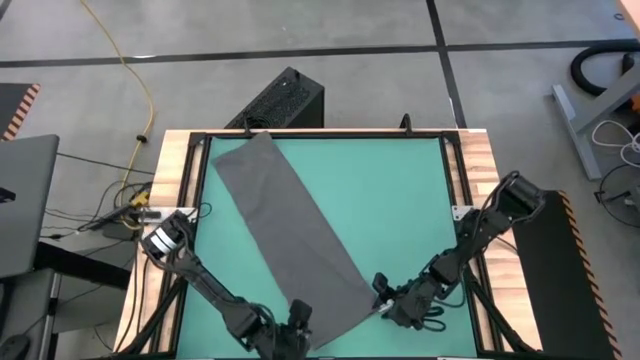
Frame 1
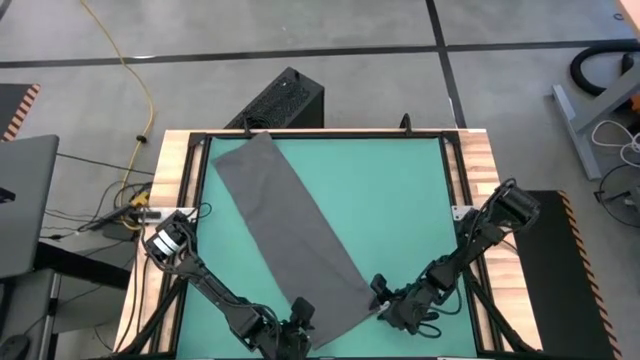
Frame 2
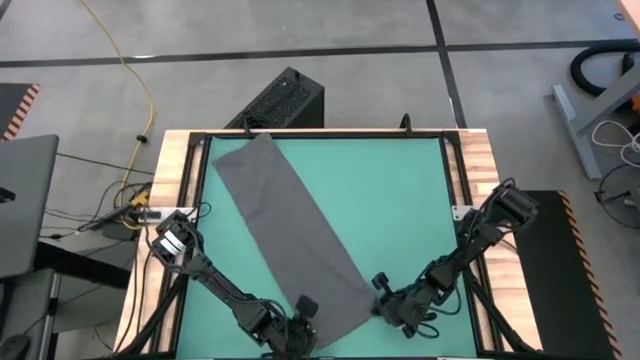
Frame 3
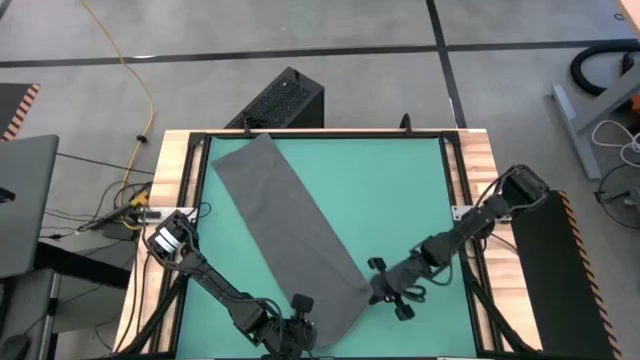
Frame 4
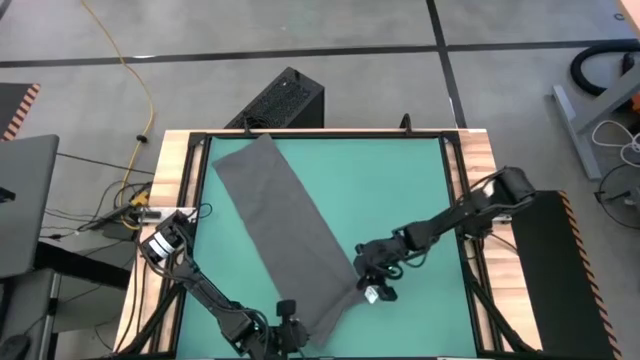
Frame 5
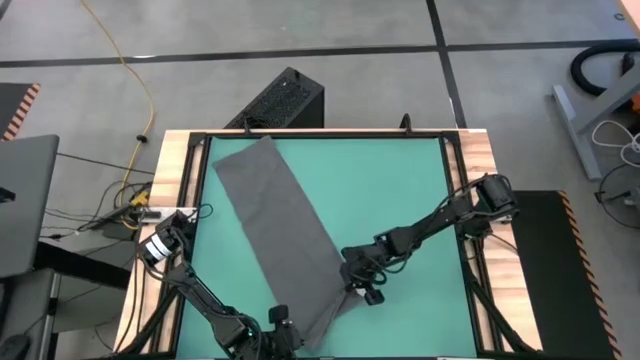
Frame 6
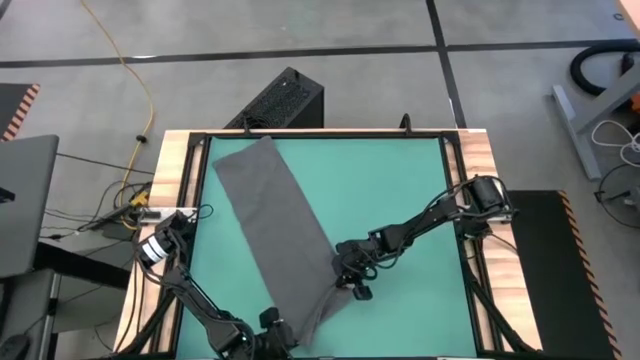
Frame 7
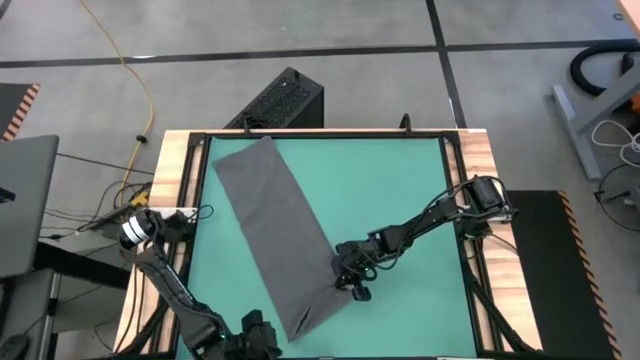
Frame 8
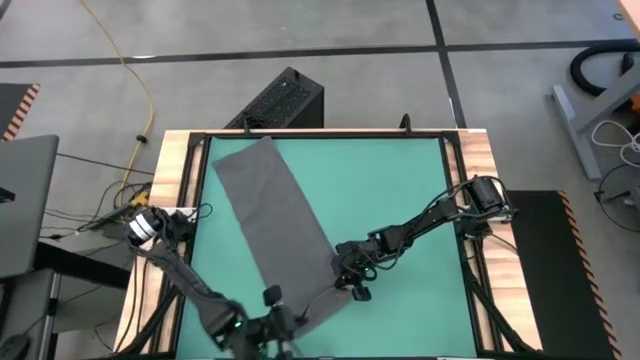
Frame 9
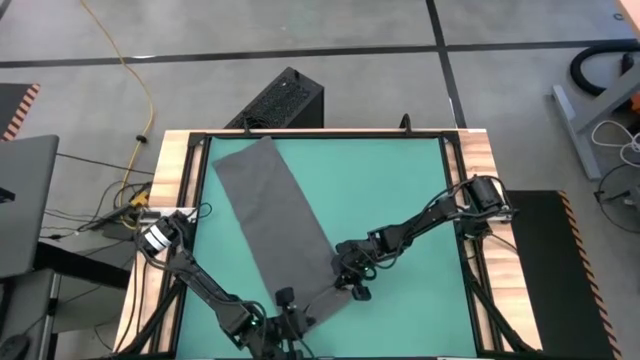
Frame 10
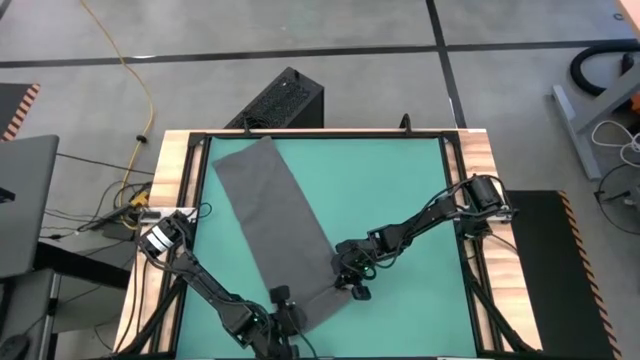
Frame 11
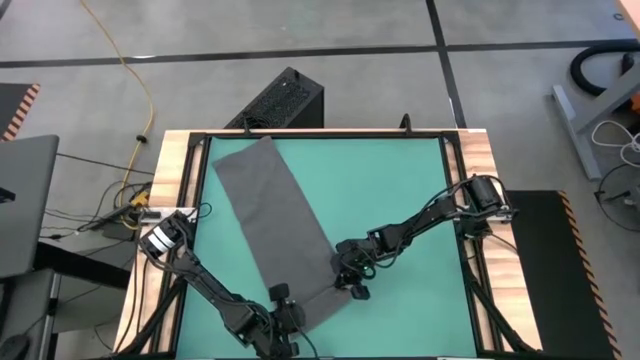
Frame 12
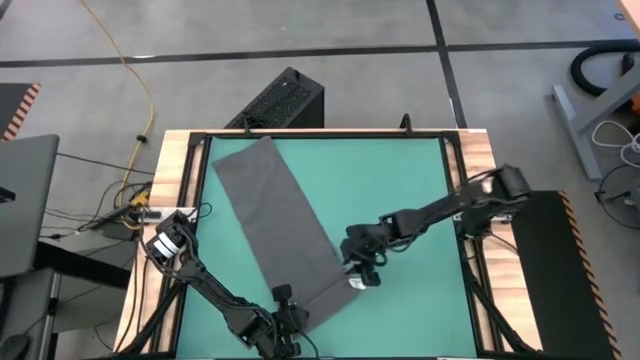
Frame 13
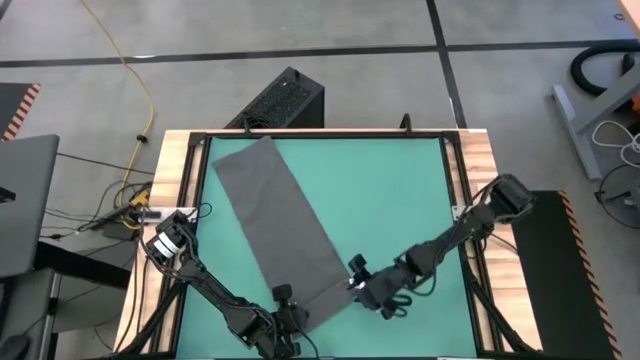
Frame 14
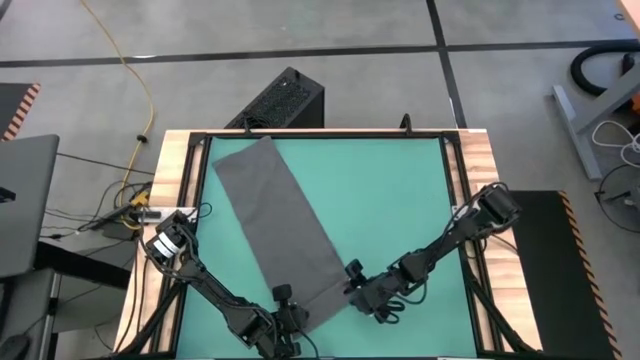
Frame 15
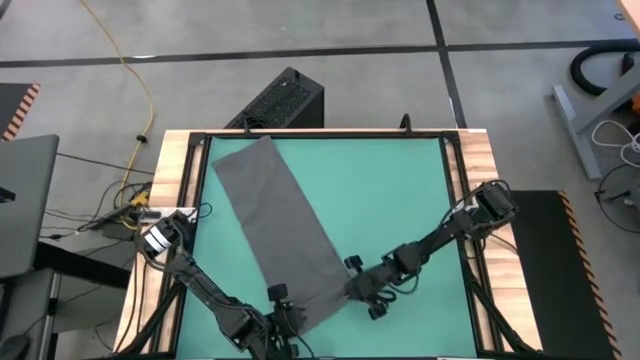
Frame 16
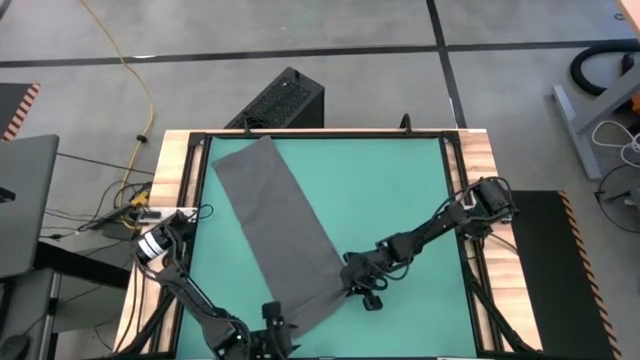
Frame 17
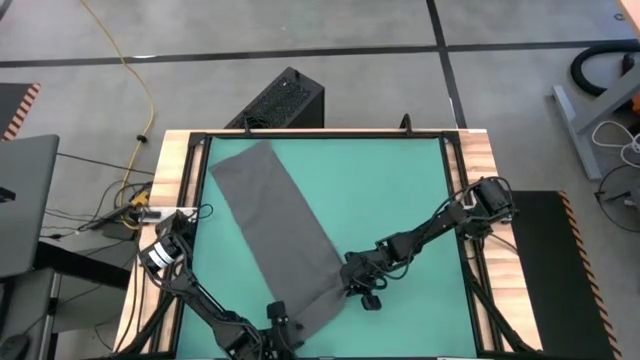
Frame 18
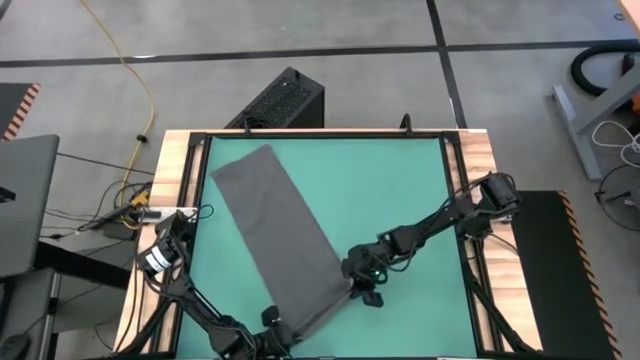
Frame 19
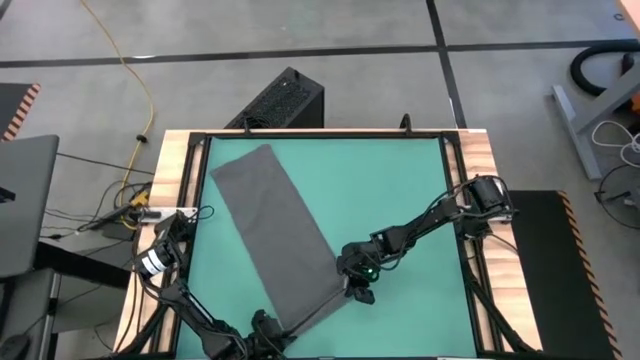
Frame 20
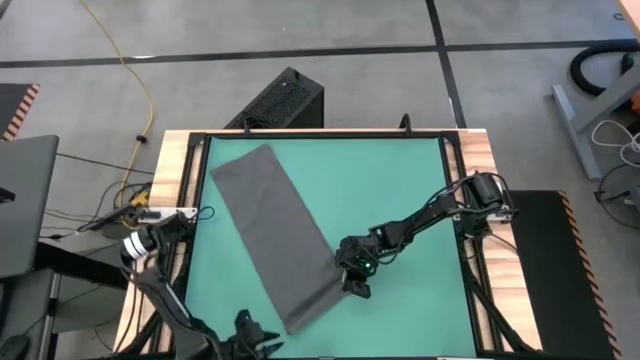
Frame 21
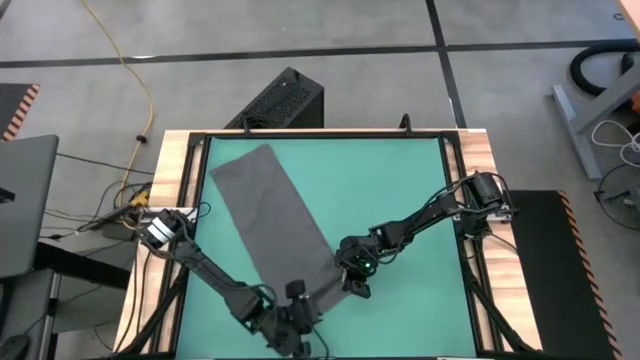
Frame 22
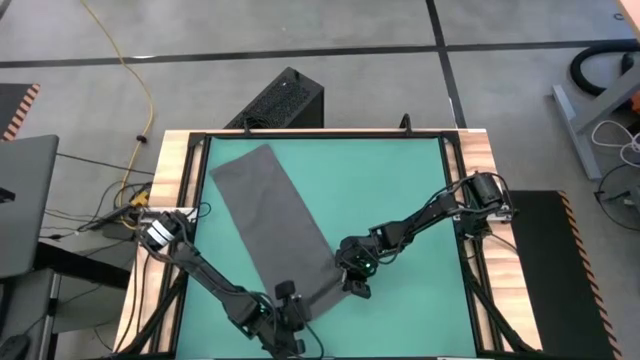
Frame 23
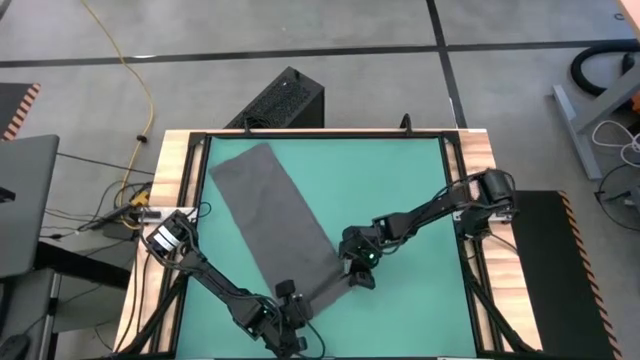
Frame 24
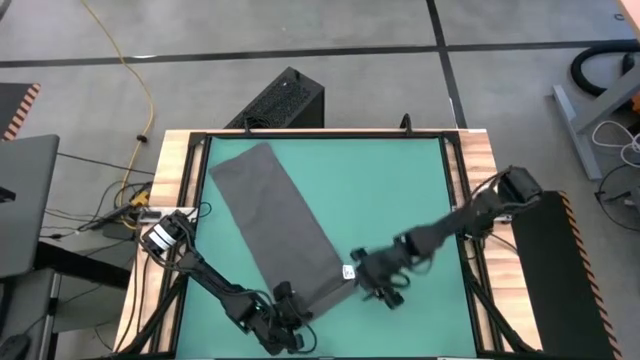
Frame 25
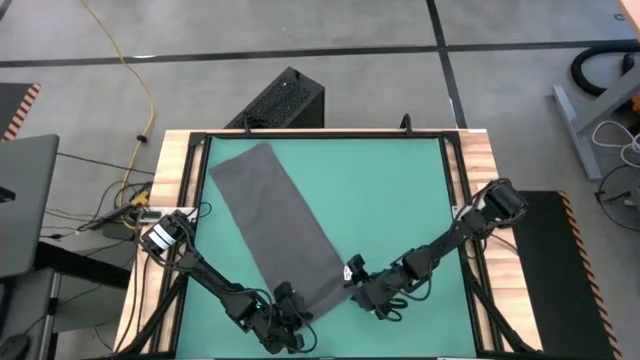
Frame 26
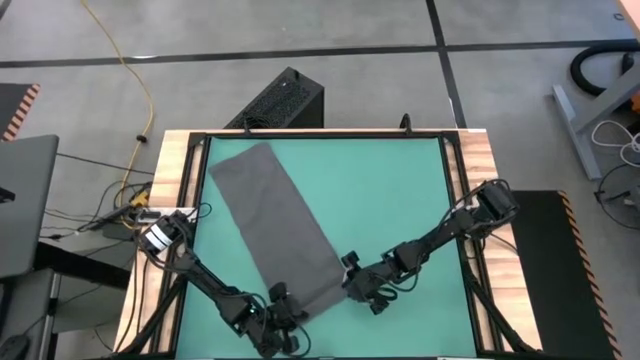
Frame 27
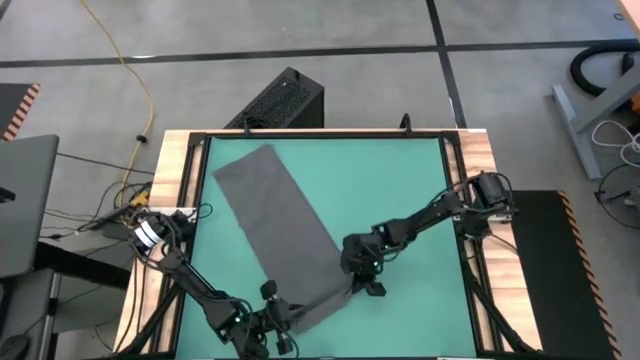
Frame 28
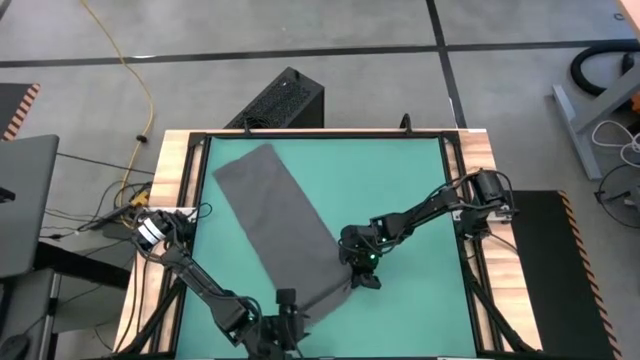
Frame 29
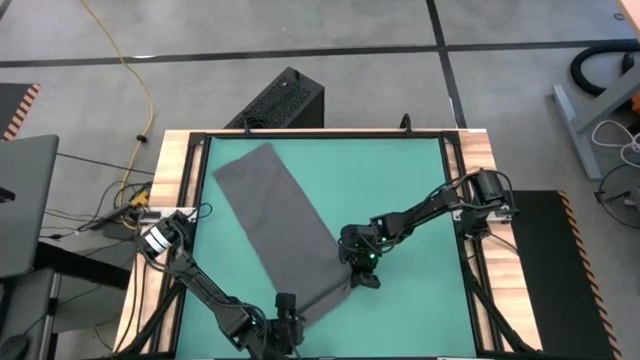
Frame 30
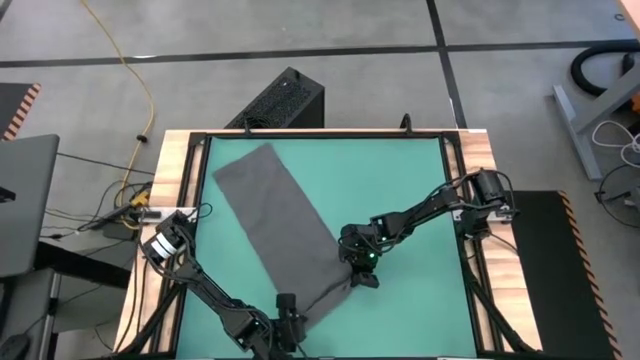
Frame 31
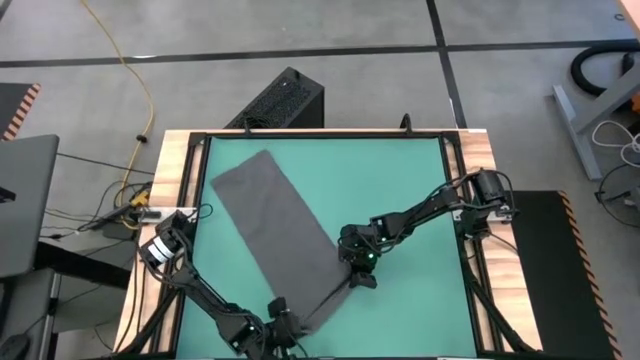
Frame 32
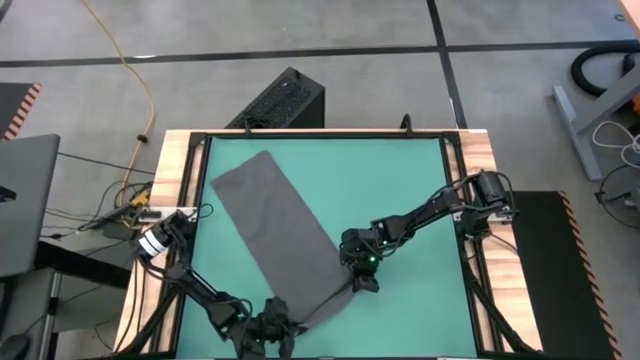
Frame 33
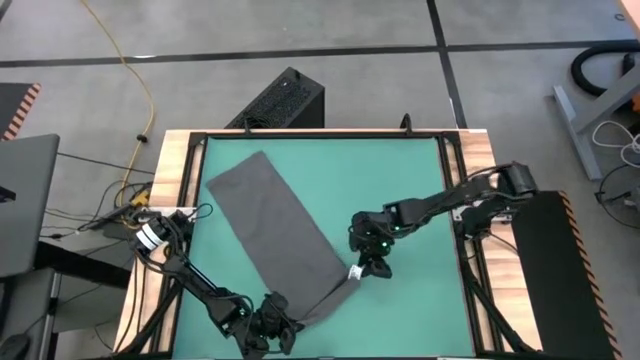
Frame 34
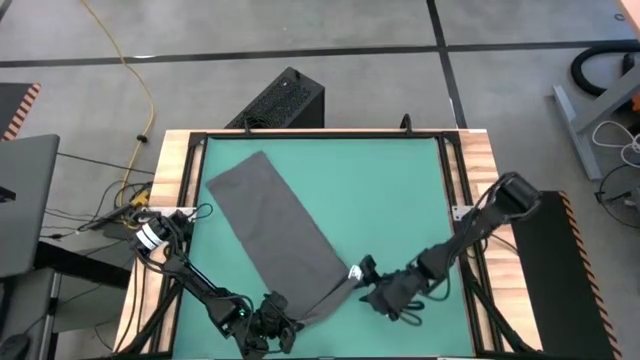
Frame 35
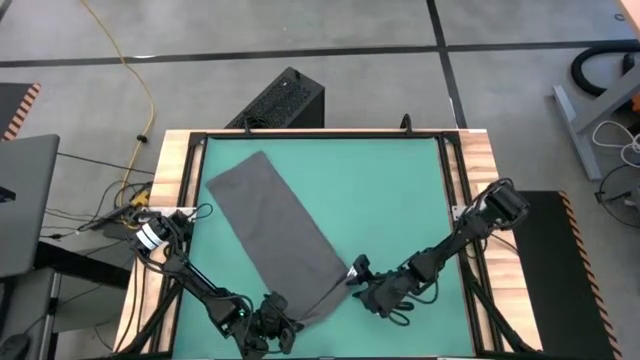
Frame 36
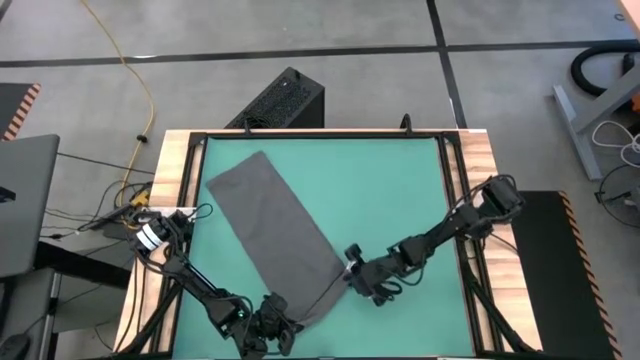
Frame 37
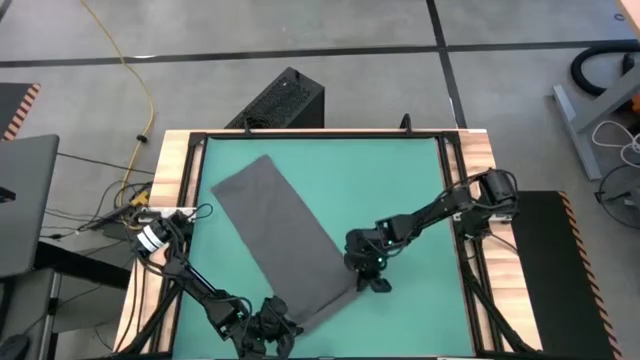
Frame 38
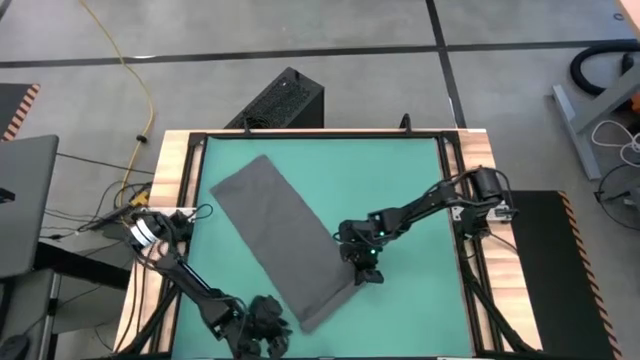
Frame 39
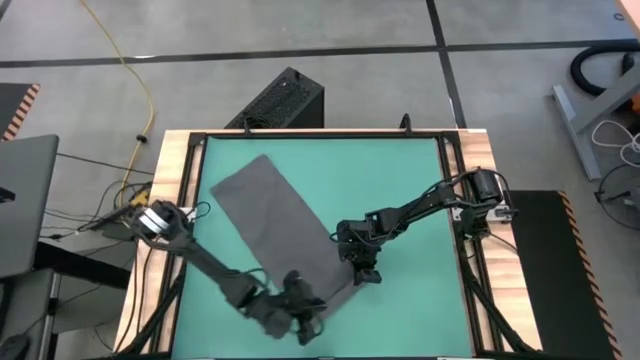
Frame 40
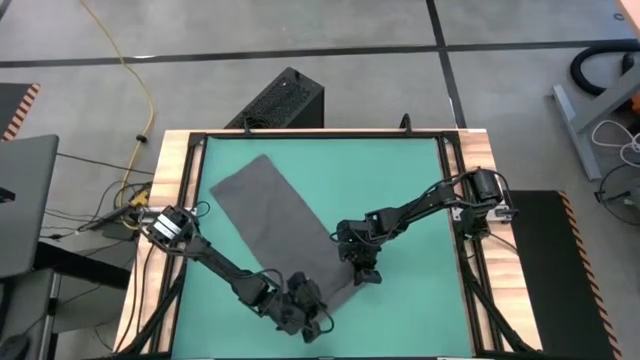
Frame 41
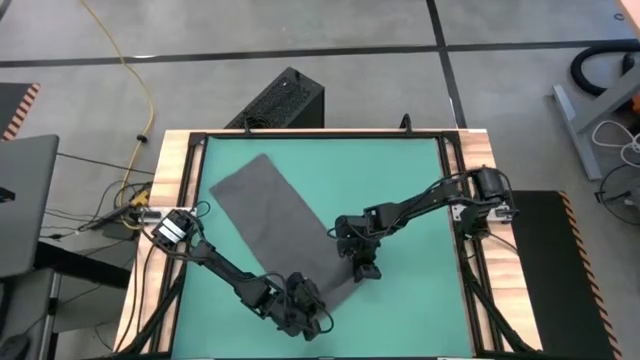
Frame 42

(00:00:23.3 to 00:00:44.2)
Task: Roll towel
Roll the black towel
